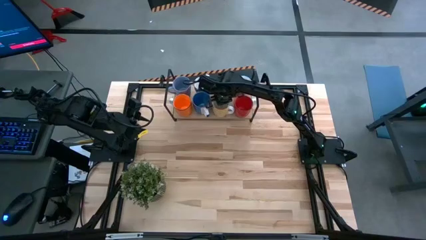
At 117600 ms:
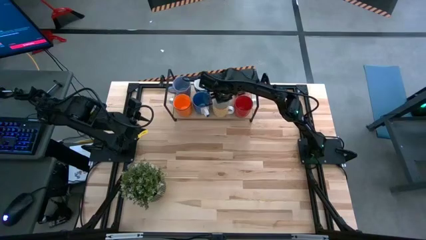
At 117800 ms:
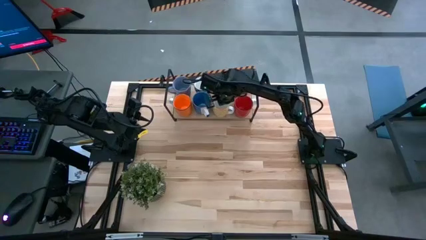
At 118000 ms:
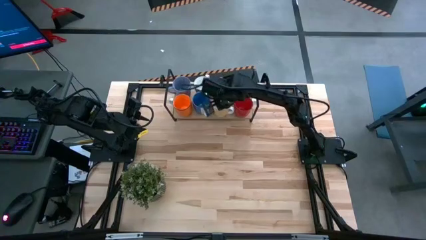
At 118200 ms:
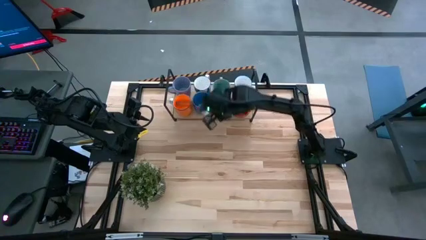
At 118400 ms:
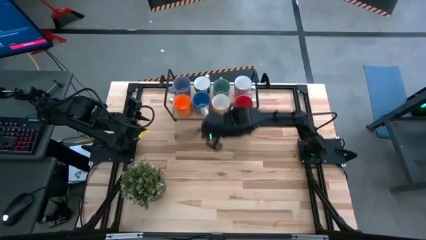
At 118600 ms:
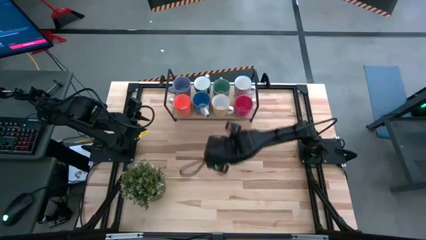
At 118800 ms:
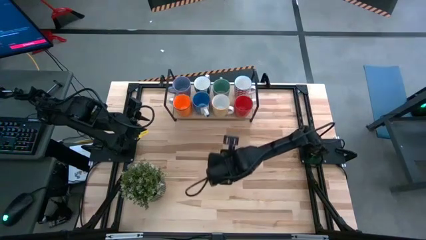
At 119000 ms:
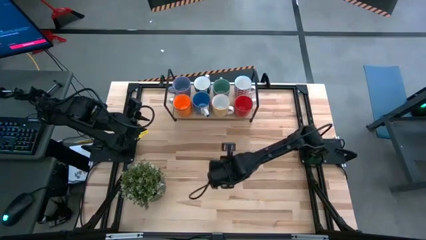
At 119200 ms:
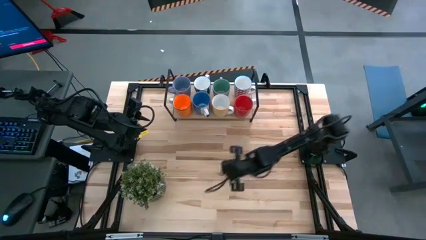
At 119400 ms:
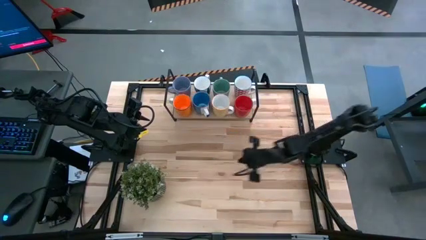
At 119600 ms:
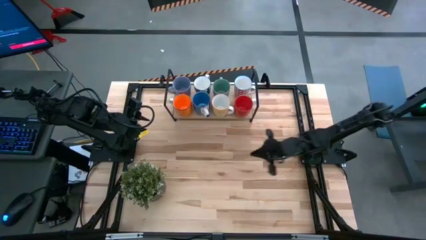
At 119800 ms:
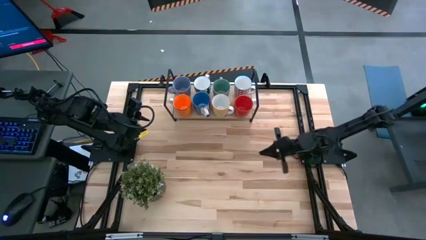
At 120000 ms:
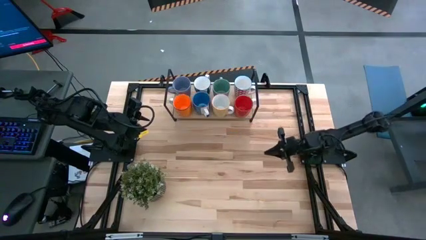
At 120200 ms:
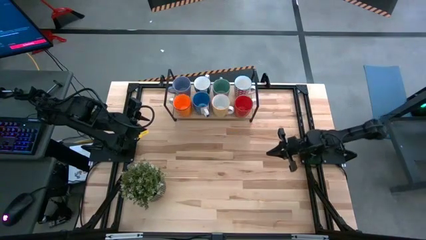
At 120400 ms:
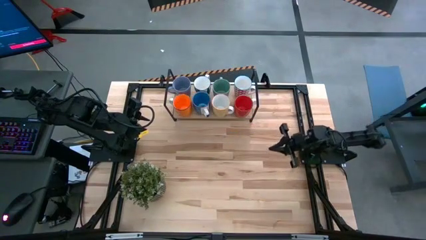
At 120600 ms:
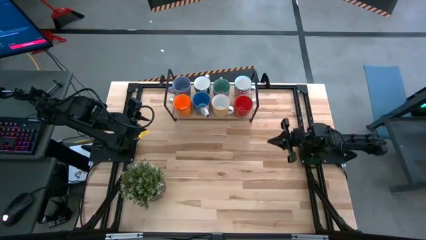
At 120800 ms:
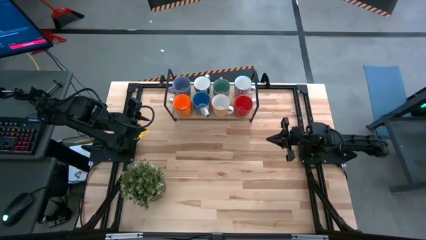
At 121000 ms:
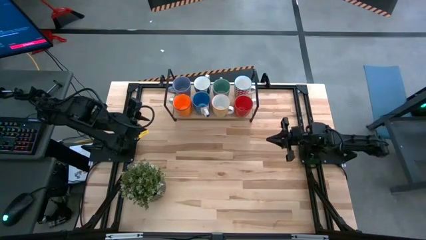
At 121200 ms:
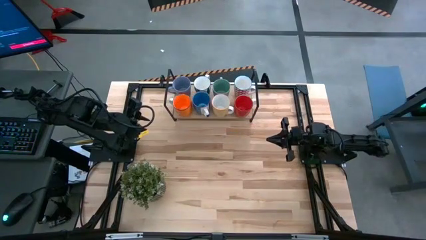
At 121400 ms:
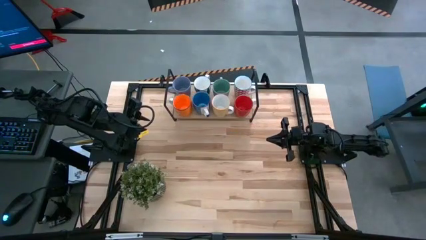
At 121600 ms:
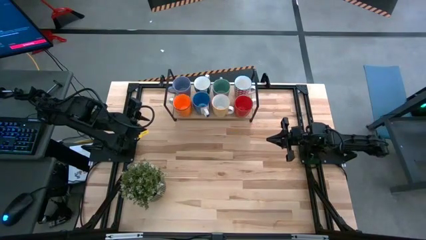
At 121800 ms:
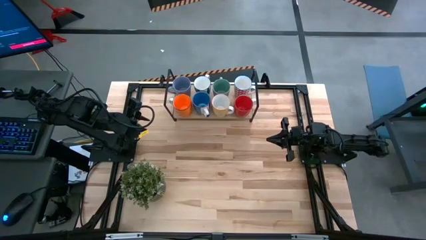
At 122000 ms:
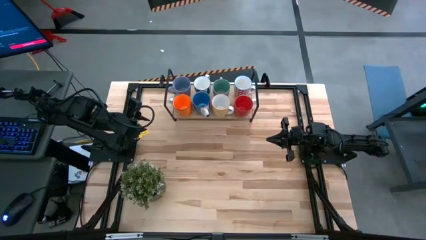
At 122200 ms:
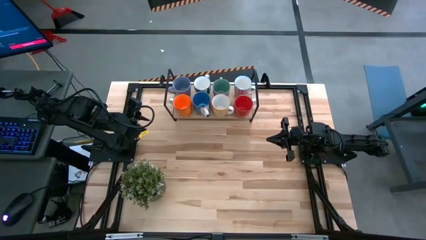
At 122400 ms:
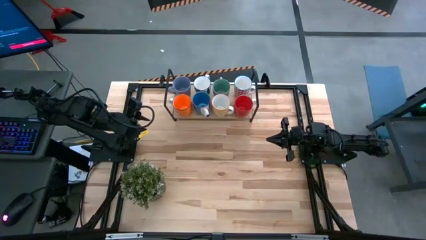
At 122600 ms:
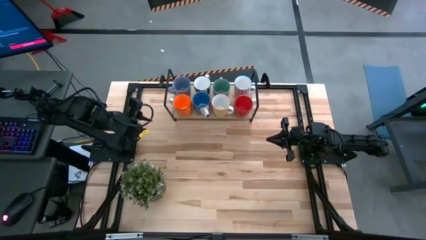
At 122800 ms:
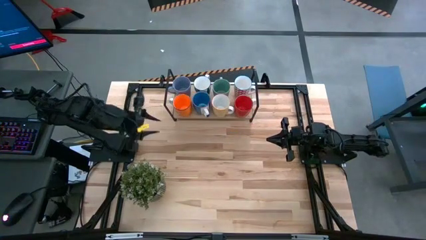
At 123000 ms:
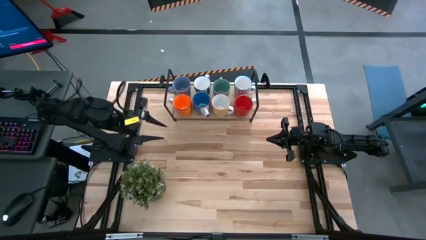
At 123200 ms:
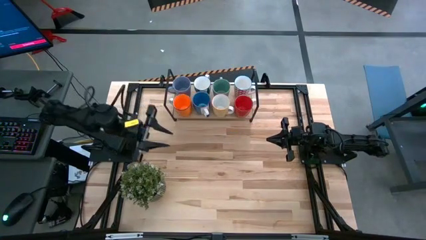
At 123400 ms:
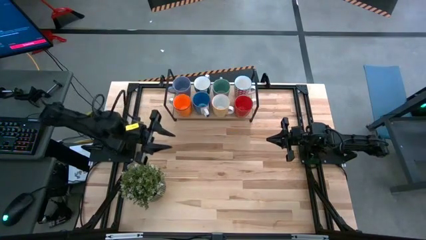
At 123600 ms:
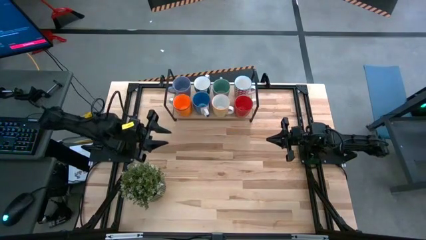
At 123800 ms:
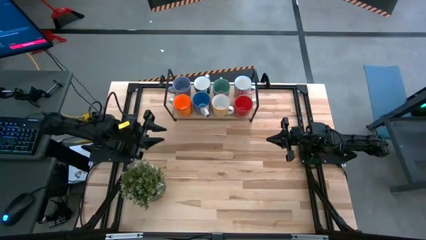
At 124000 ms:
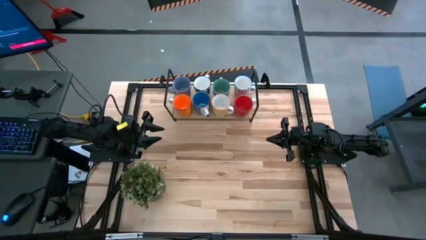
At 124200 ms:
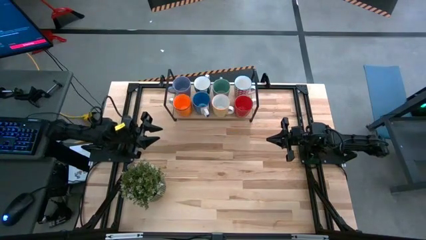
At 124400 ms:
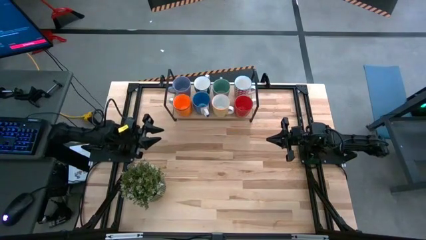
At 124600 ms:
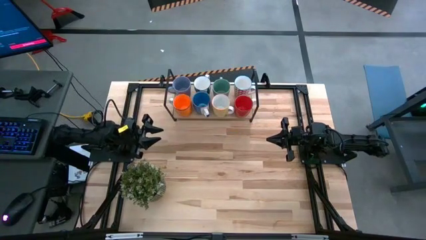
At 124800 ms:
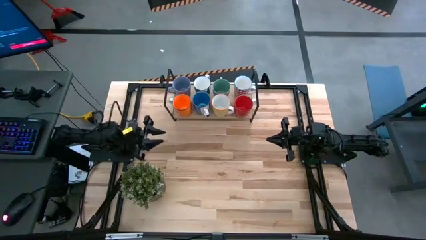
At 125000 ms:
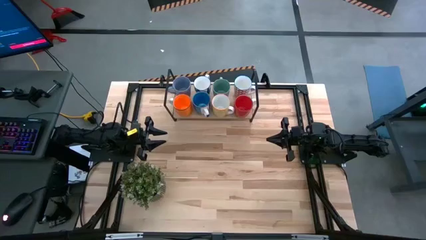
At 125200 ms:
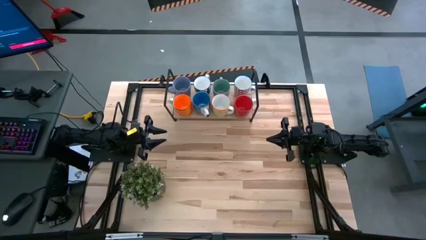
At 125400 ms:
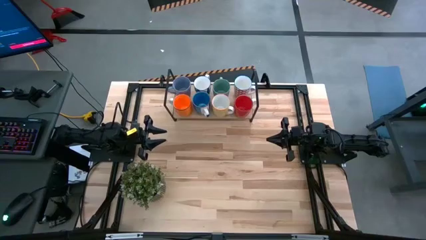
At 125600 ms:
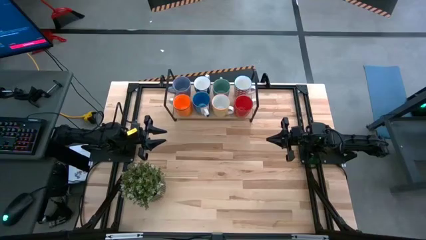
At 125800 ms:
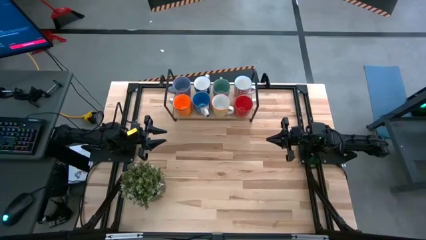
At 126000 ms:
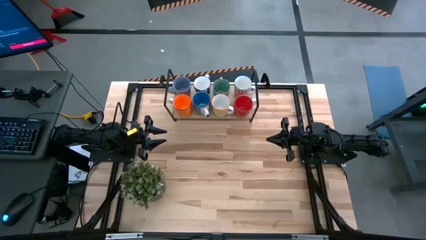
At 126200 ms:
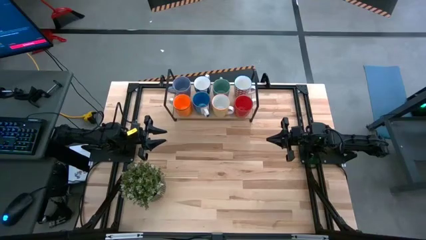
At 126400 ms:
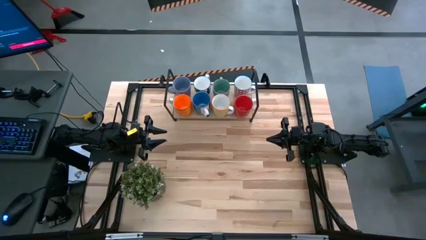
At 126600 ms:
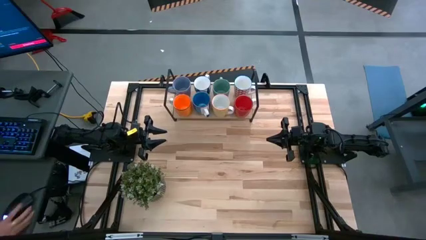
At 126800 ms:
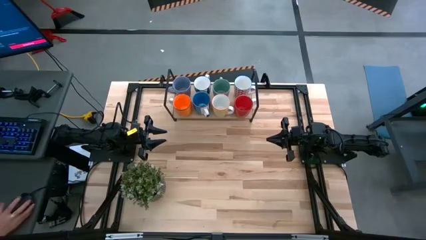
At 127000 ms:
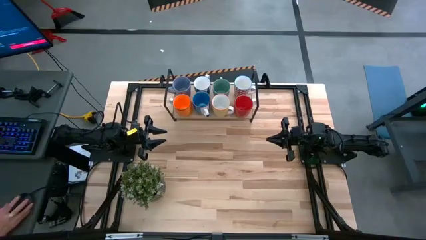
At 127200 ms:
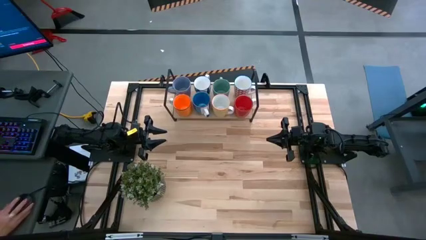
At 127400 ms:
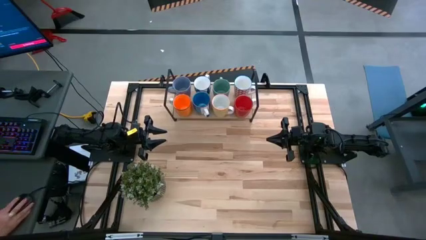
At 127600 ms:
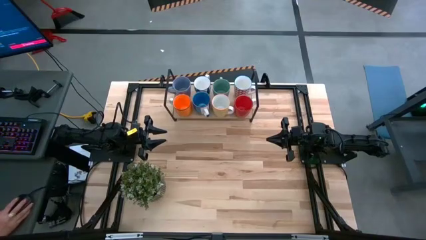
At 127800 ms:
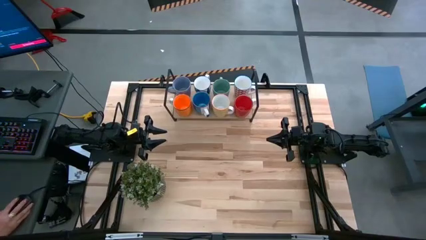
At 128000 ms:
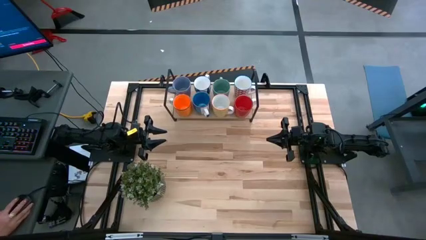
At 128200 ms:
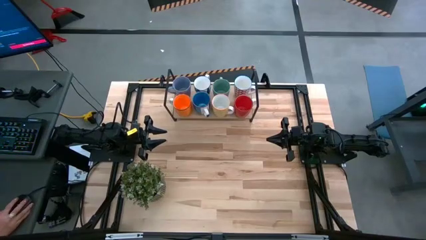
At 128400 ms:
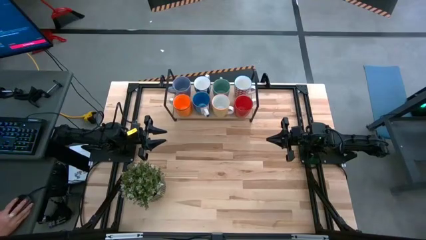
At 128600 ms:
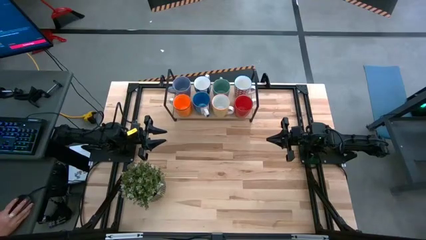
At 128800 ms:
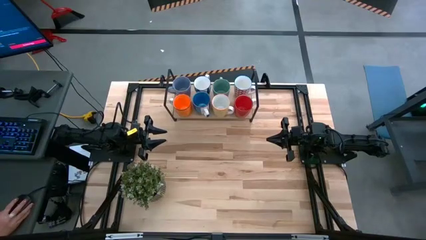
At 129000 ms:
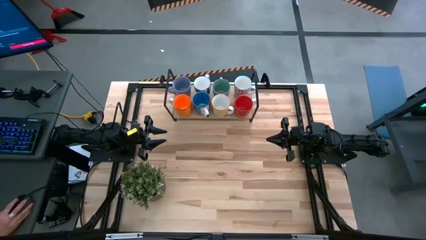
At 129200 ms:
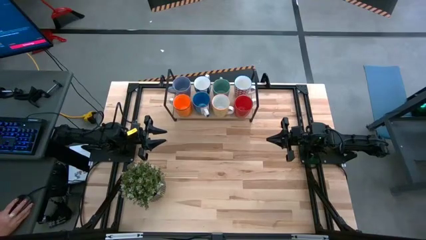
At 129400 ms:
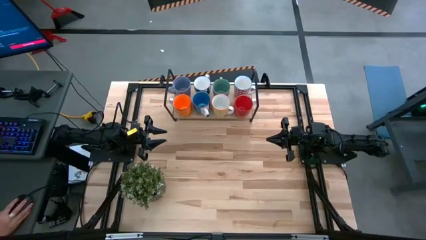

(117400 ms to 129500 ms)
Task: Place coffee mugs
Return to Home Position

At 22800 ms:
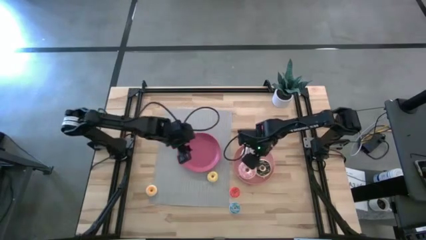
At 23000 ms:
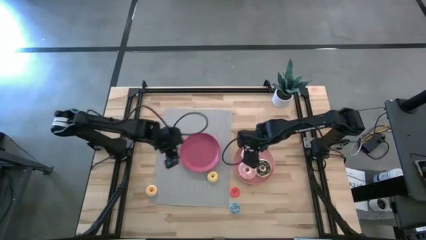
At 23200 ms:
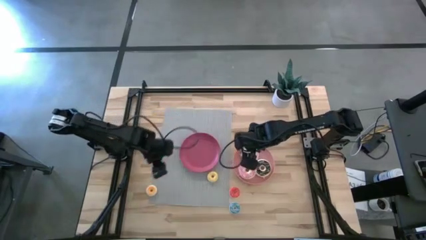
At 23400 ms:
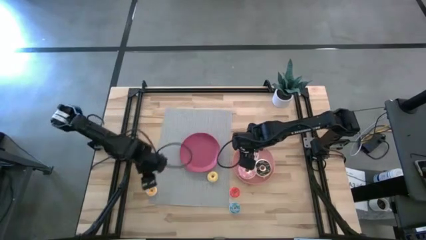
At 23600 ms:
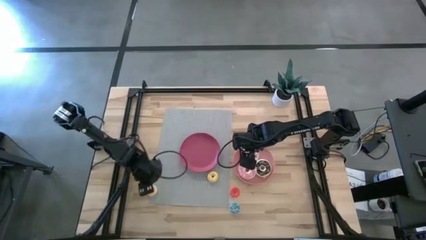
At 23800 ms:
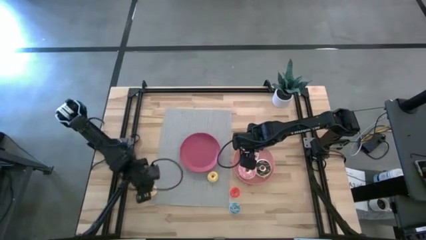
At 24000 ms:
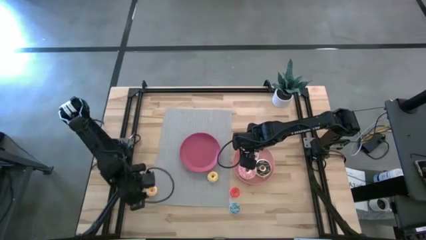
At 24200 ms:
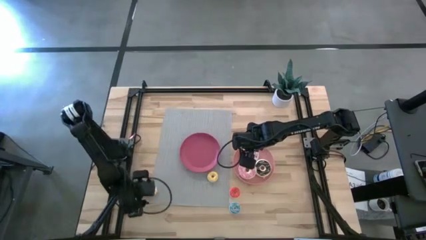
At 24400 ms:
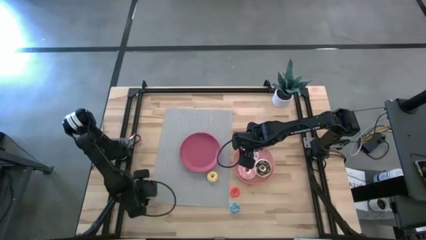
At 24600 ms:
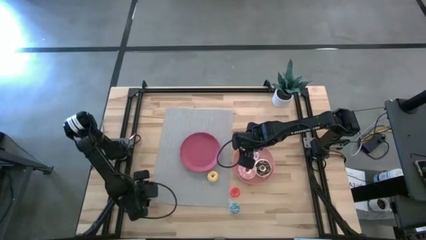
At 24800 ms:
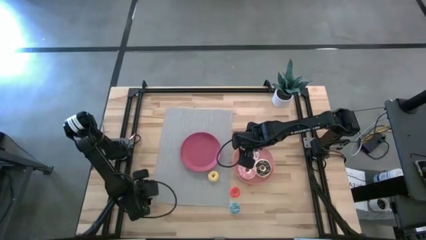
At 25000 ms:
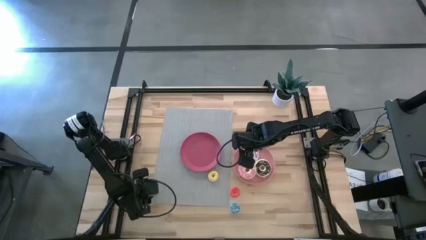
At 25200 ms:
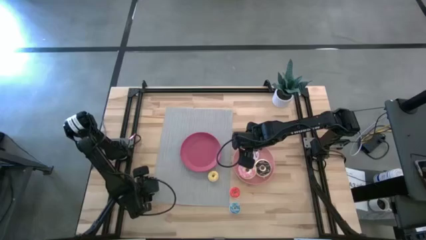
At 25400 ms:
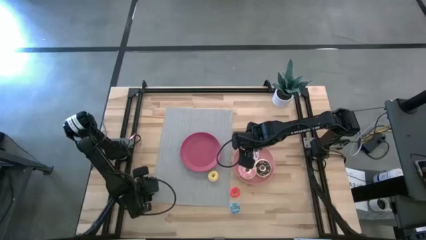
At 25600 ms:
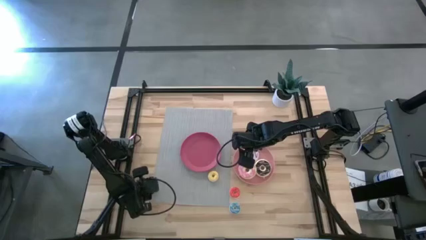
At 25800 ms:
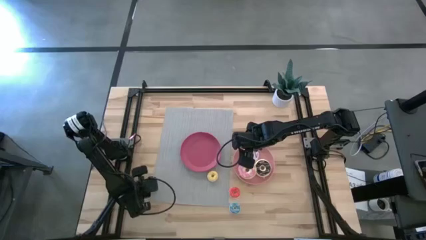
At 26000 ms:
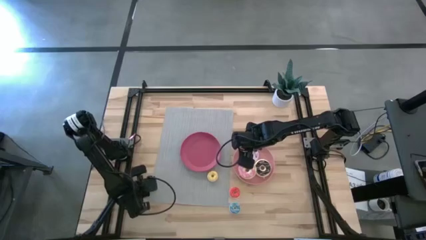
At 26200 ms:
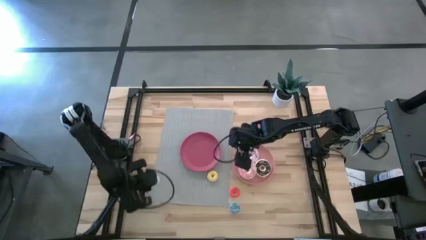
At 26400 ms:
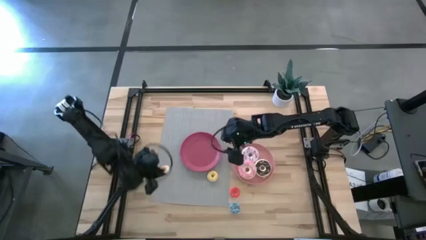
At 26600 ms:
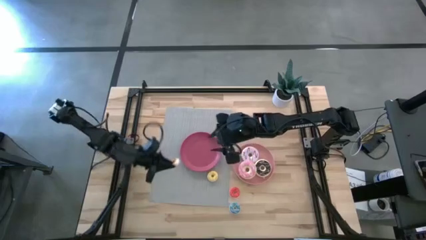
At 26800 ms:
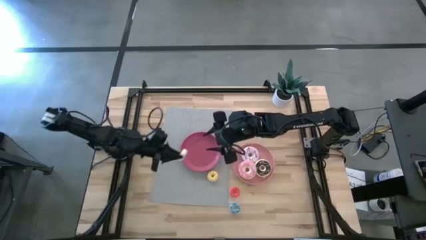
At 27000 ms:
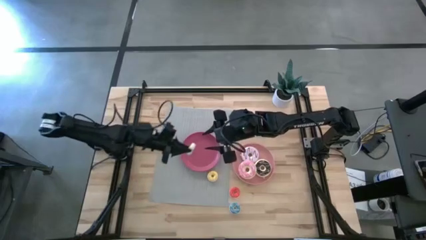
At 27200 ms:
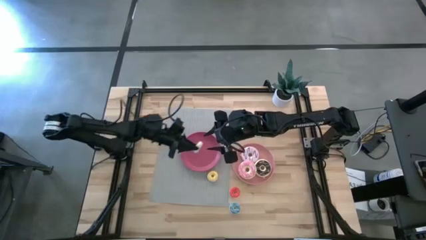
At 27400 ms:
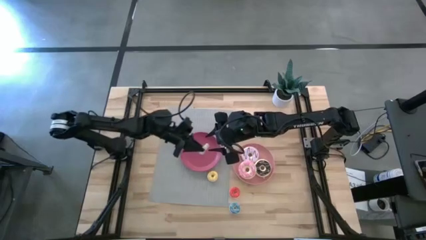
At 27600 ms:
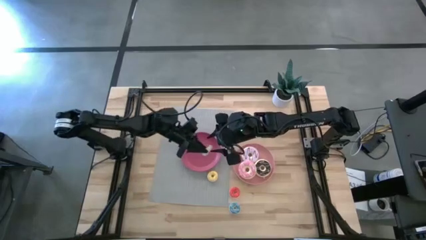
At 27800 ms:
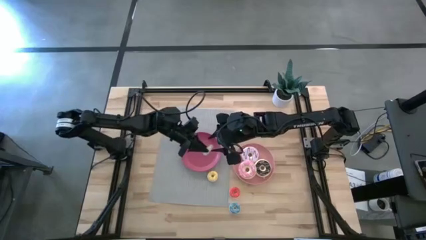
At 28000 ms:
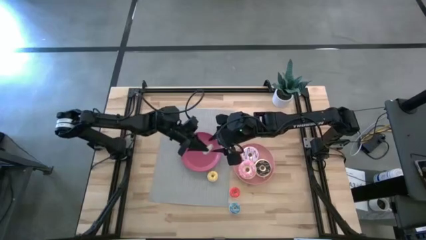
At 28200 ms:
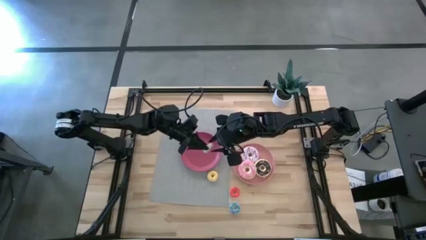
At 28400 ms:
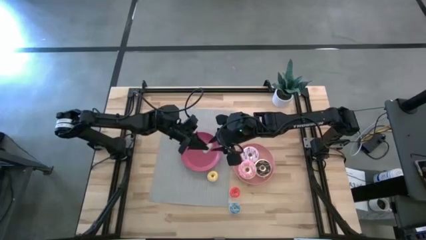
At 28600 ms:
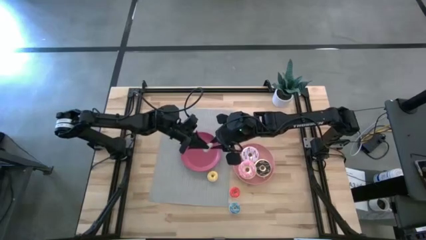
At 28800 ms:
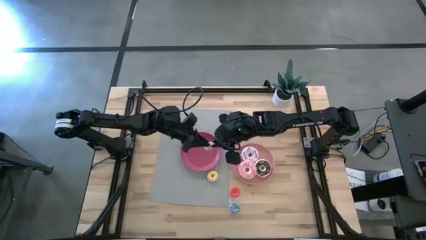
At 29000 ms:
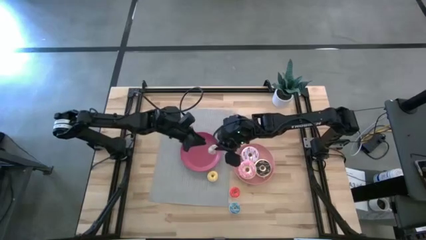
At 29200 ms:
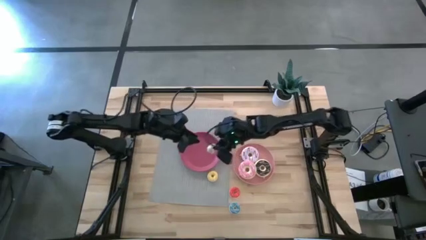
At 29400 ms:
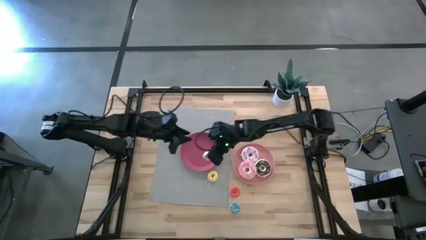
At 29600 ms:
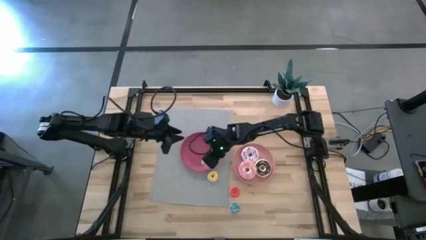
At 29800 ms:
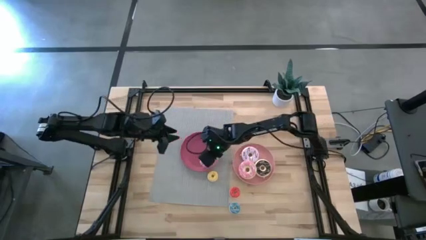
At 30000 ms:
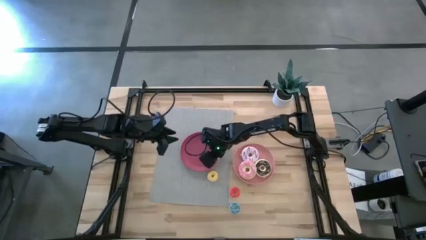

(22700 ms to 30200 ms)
Task: Pick & Place donuts
Put the small white donut into the pink plate
